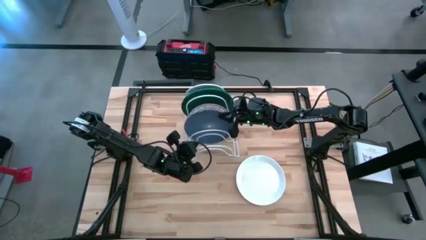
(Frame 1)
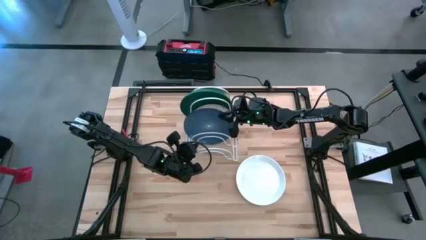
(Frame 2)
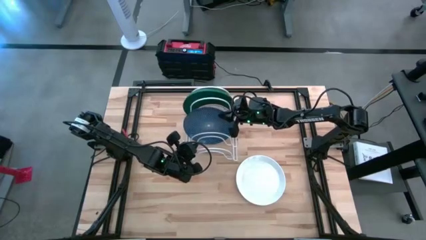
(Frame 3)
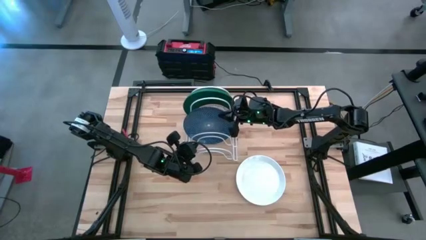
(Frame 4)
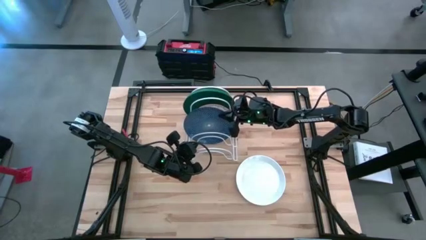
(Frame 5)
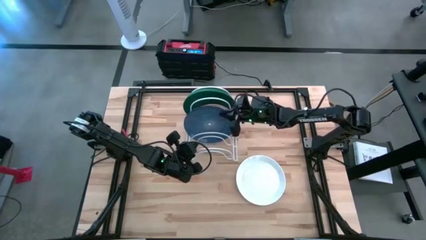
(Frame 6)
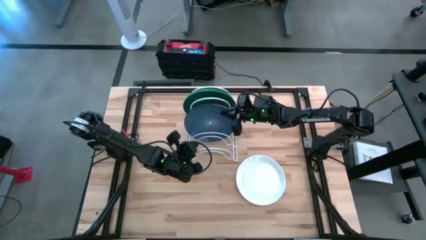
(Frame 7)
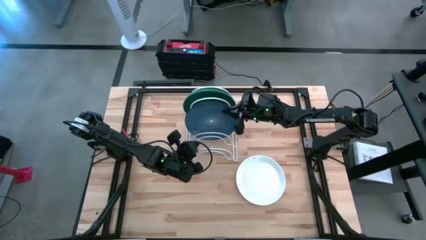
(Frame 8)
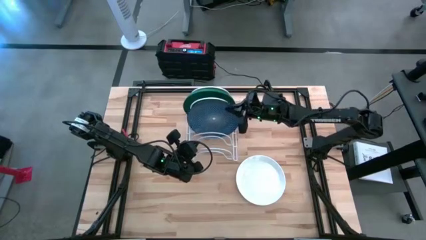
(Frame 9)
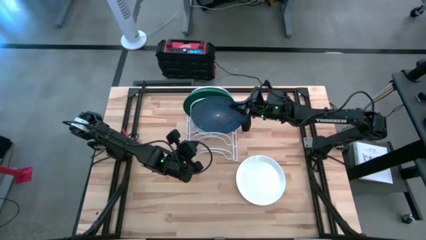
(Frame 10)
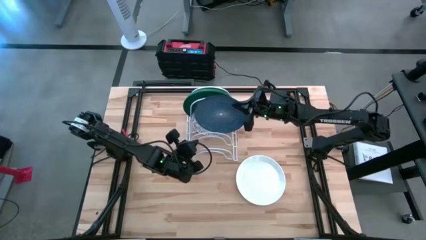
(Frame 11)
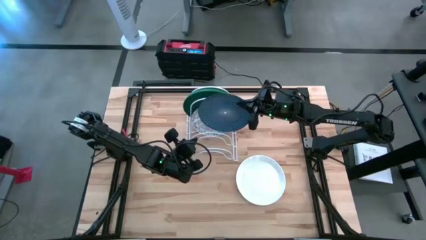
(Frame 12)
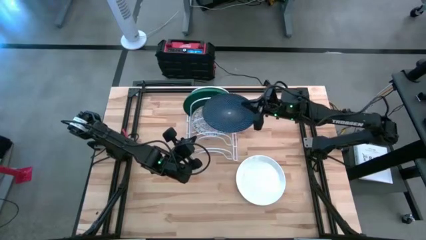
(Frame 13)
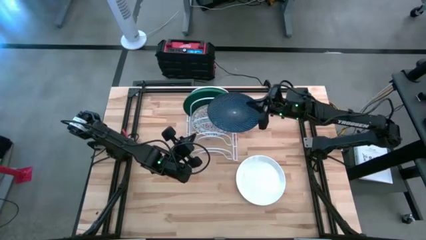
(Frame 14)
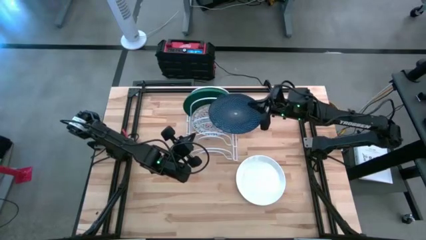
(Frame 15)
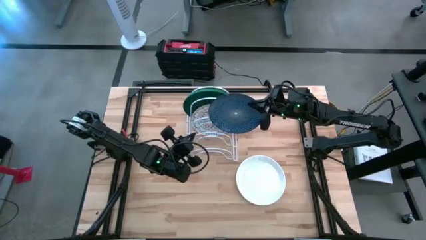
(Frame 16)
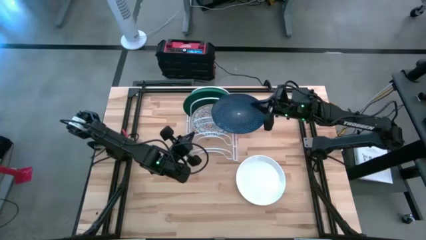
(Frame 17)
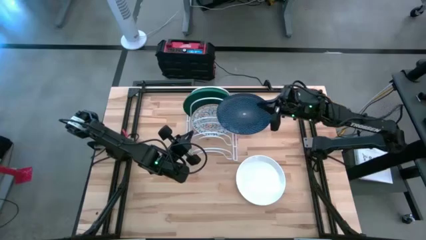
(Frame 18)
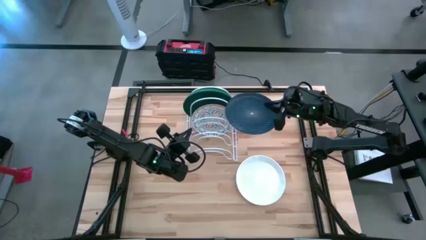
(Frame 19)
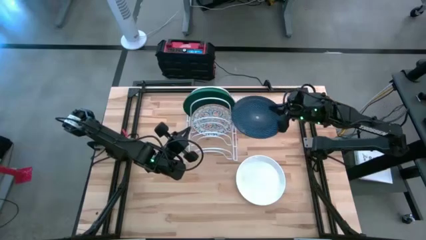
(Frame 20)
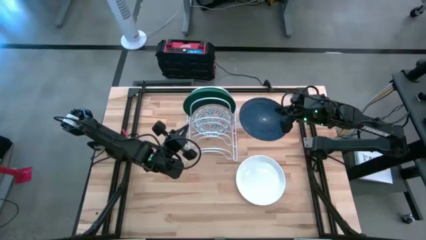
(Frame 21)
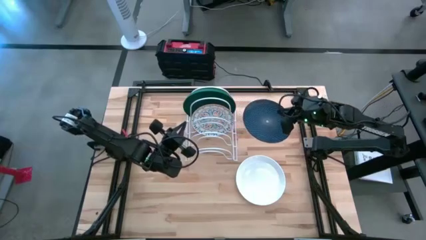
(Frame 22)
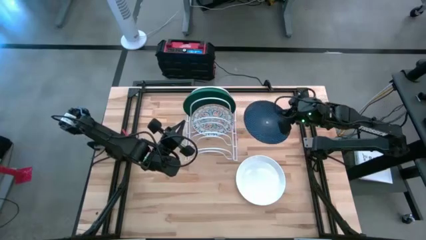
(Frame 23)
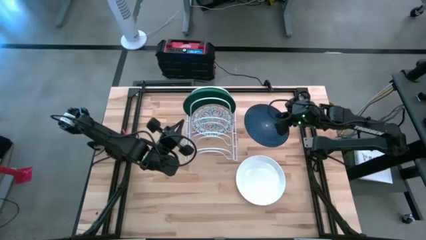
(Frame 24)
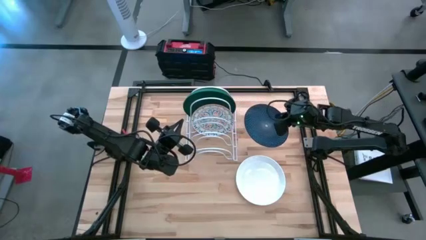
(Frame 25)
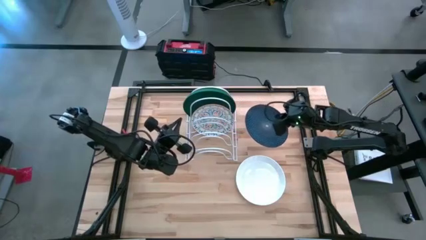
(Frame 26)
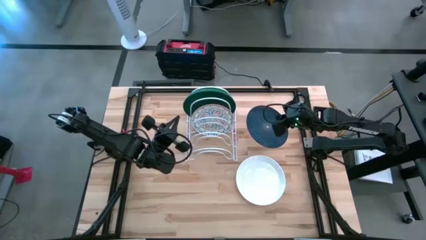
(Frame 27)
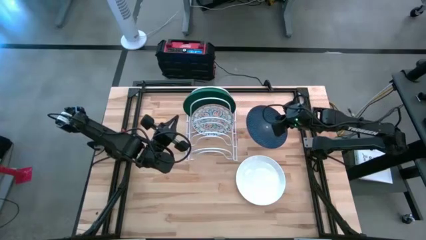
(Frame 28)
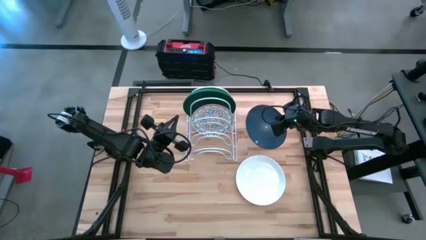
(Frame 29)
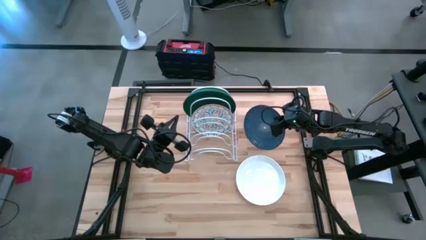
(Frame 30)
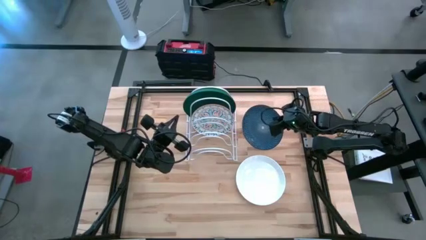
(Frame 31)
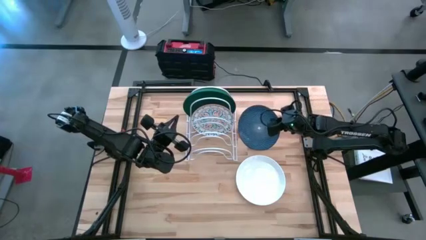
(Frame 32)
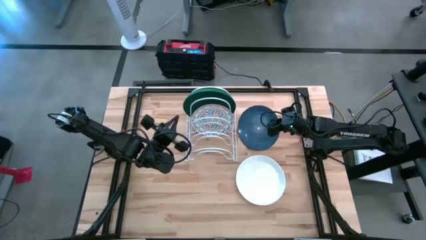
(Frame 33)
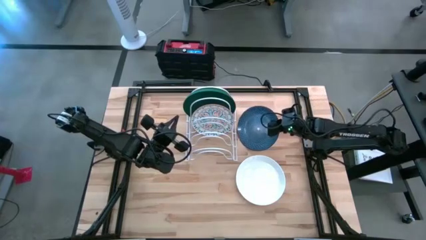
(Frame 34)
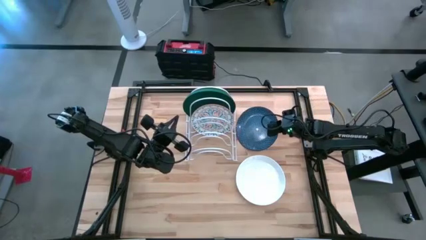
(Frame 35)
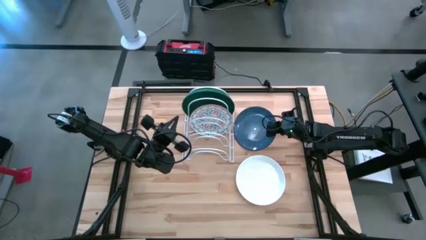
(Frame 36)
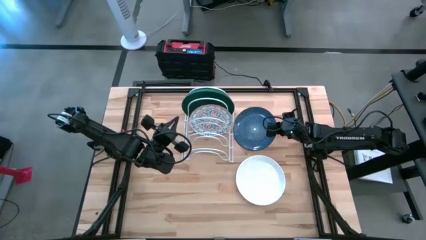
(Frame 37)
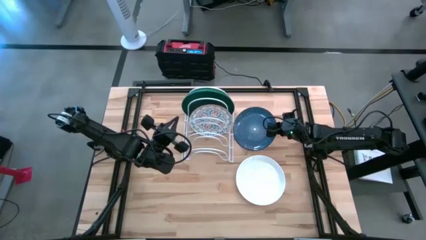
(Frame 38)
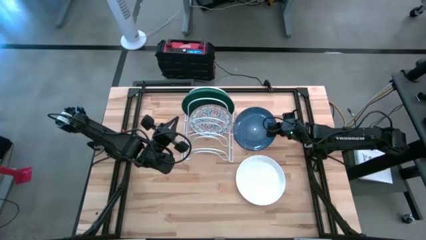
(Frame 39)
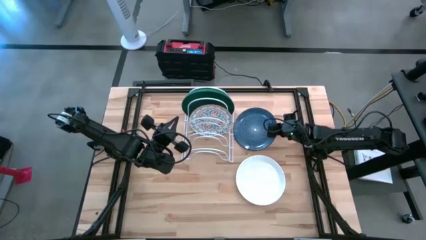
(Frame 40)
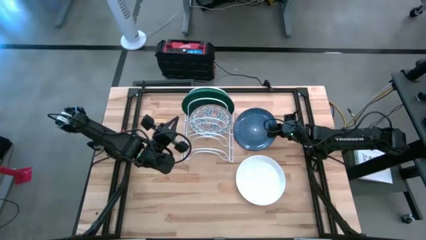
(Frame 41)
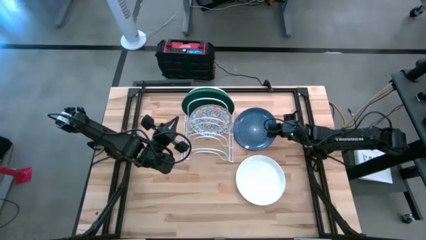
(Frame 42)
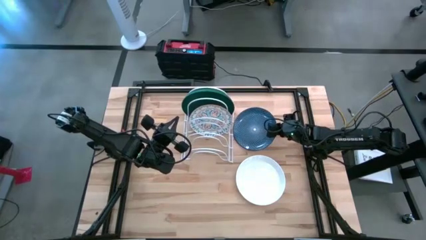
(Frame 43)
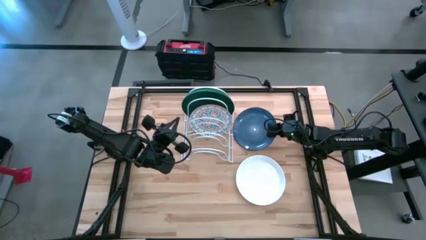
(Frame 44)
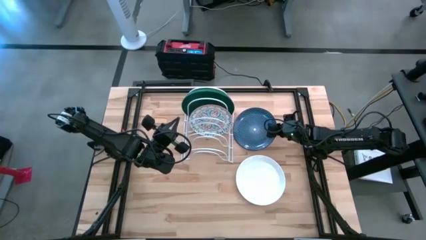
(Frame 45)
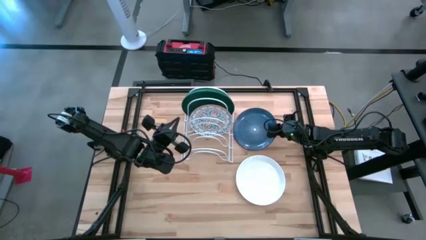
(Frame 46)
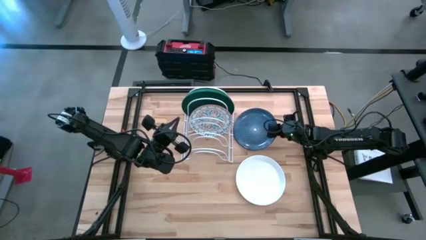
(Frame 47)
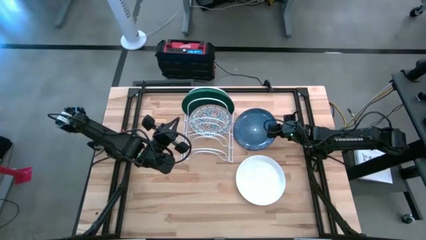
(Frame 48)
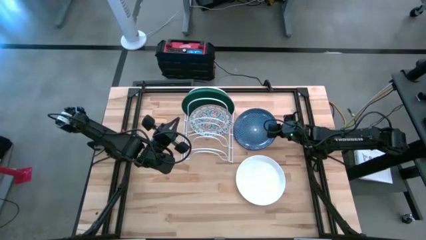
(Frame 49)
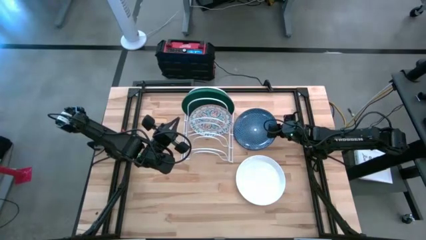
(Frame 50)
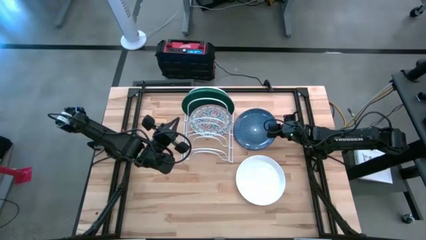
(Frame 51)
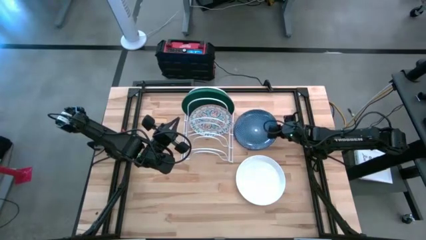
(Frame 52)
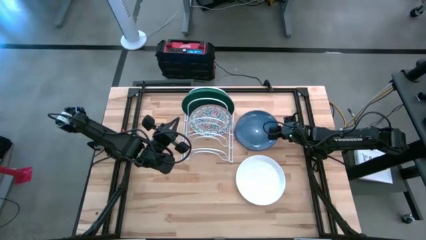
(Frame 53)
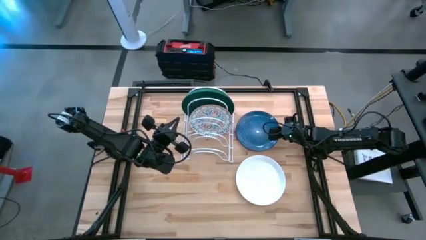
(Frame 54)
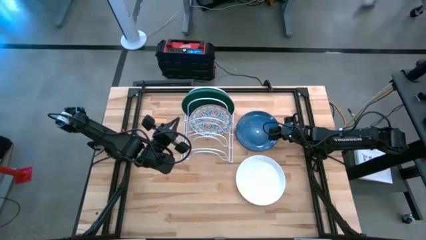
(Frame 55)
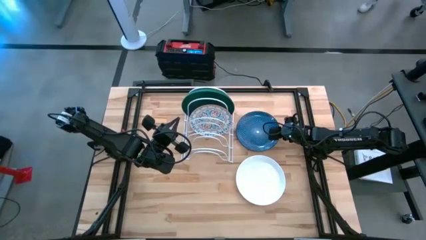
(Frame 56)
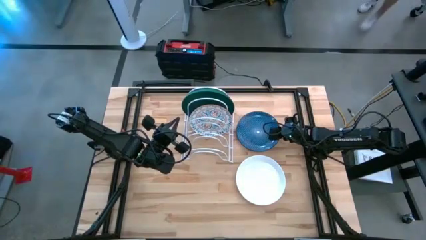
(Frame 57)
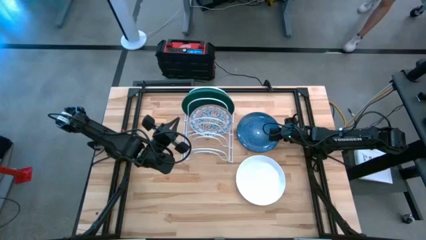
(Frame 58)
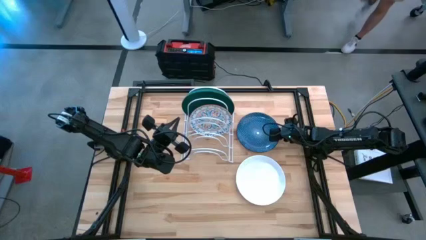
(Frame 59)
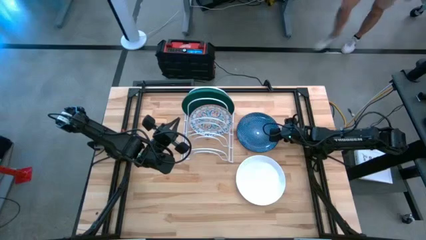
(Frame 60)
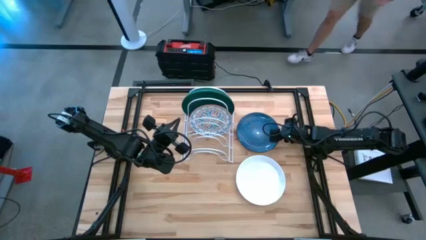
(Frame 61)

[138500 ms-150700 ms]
Task: Sort dishes
Remove the blue patterned plate from the dish rack

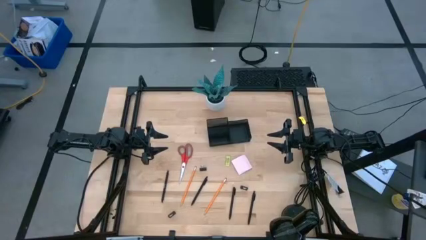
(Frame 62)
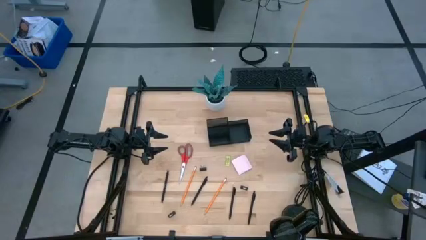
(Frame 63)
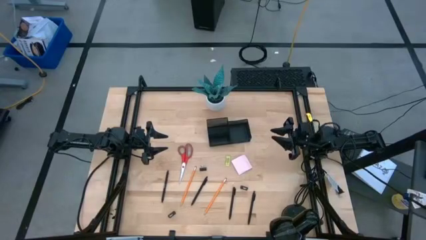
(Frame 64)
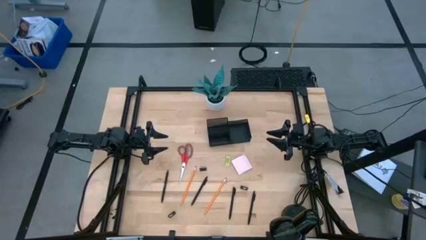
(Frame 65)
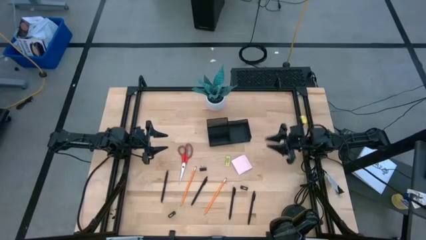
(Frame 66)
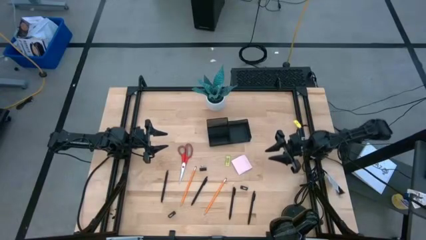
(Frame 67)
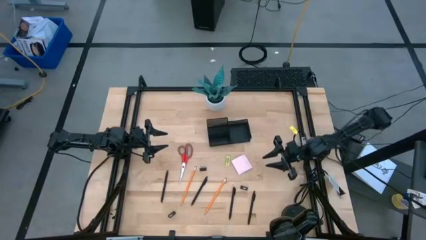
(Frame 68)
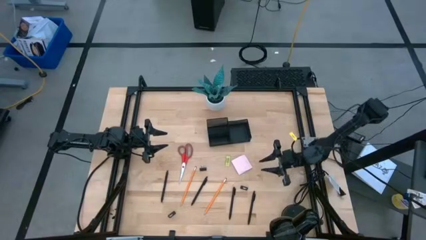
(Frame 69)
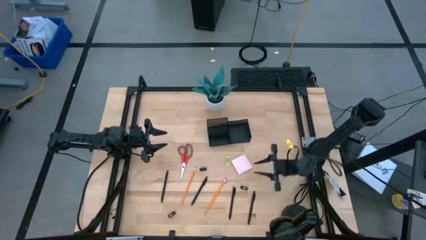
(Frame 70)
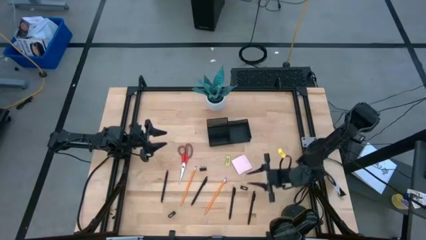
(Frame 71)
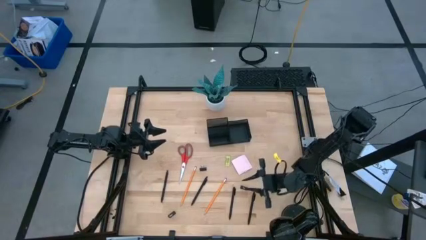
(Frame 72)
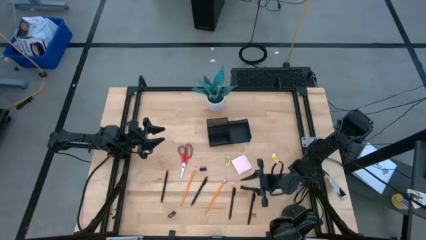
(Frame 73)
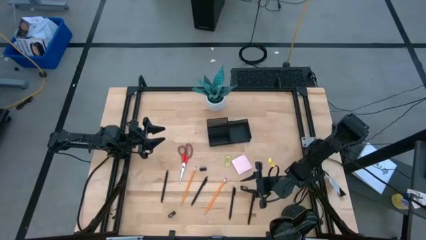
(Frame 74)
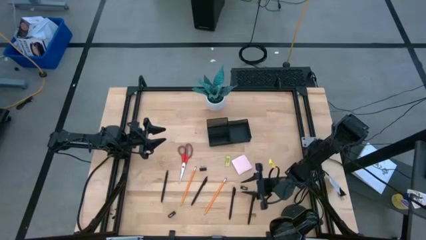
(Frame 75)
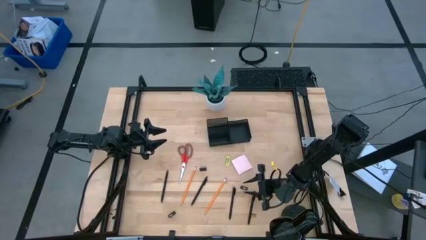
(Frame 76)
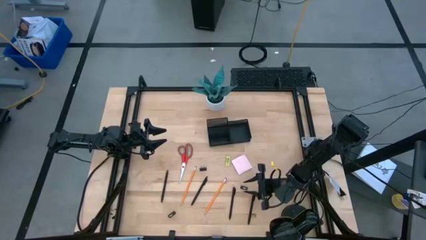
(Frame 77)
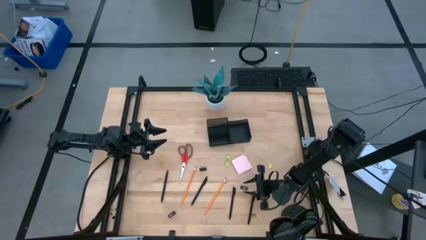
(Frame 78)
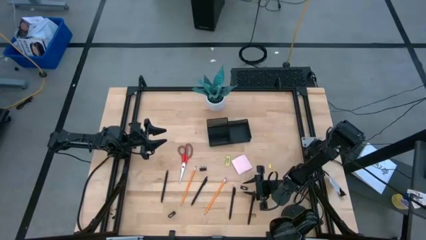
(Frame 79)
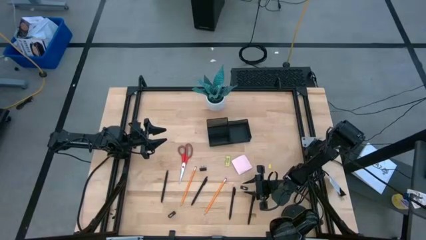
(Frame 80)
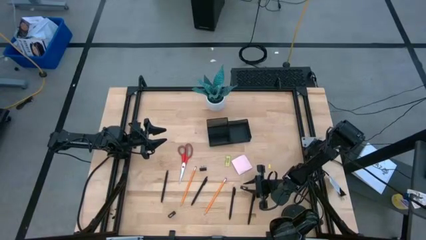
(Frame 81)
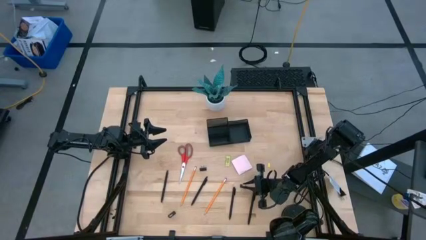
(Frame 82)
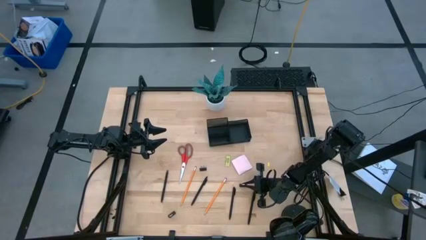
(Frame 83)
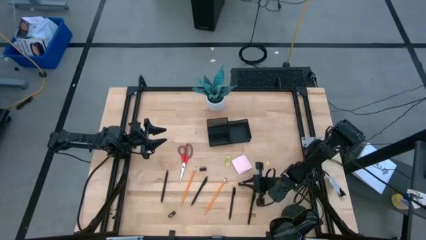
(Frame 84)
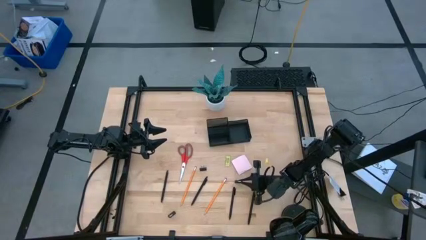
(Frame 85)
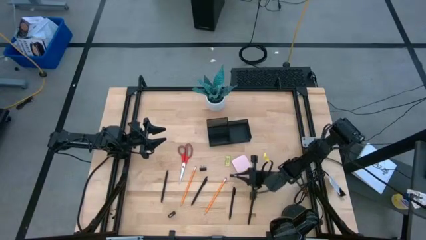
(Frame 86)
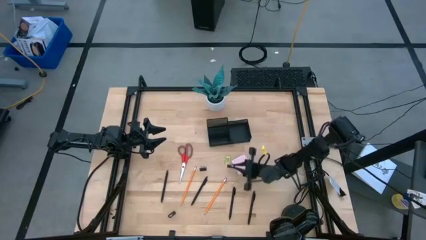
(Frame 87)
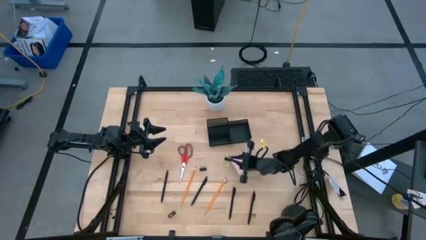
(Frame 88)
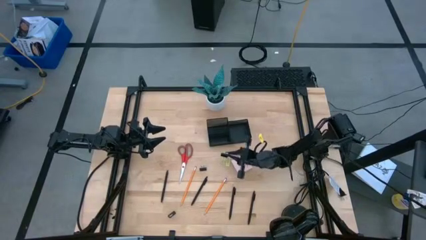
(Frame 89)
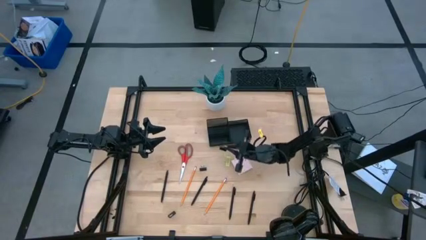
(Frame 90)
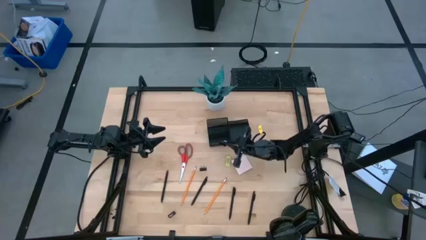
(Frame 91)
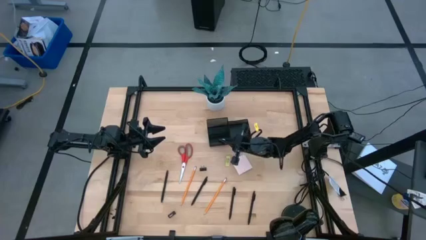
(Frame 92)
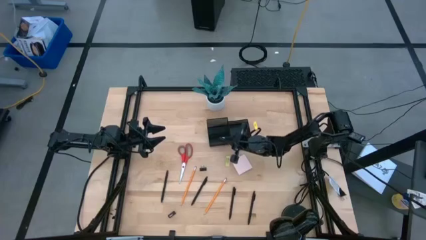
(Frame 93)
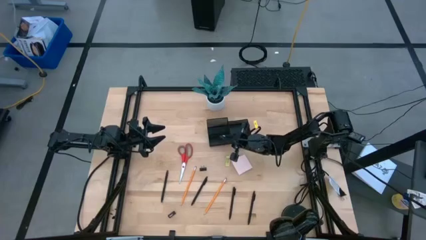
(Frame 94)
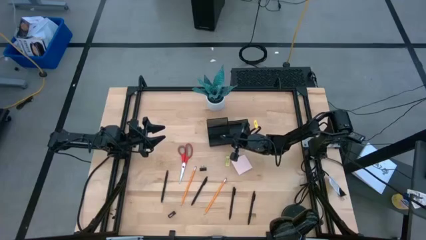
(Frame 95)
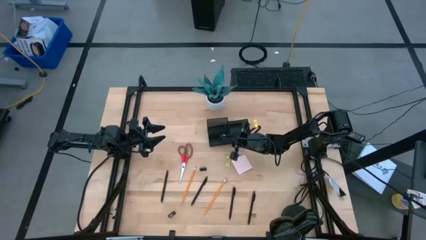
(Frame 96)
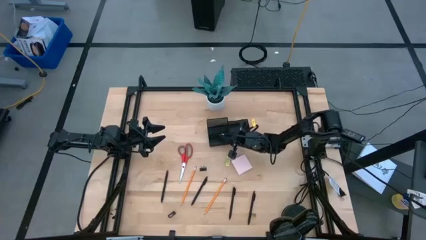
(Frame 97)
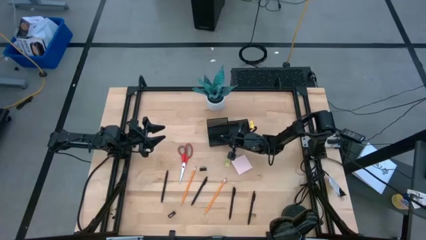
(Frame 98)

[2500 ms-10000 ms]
Task: Pick and place office supplies into organizer
Put the black binder clip into the black desk organizer
